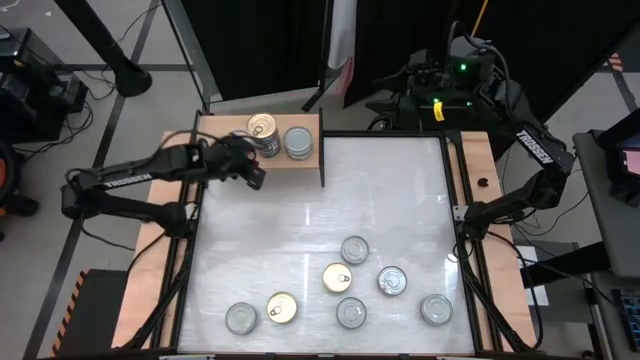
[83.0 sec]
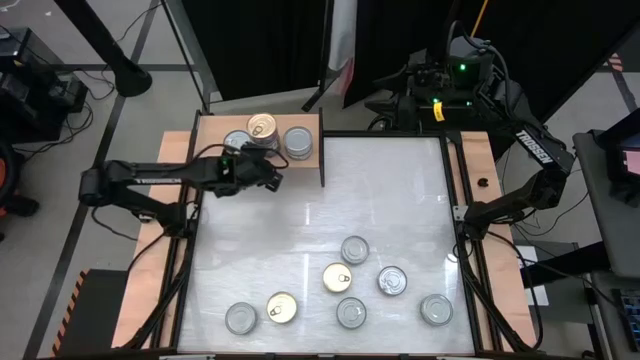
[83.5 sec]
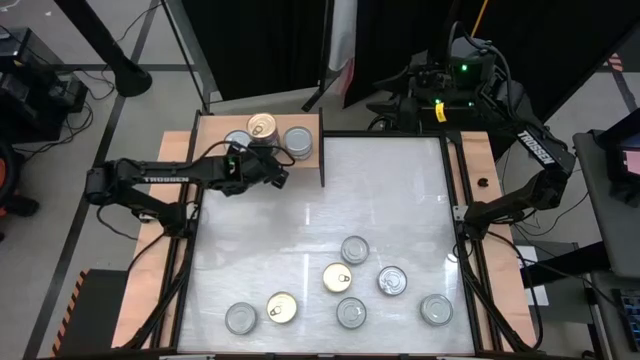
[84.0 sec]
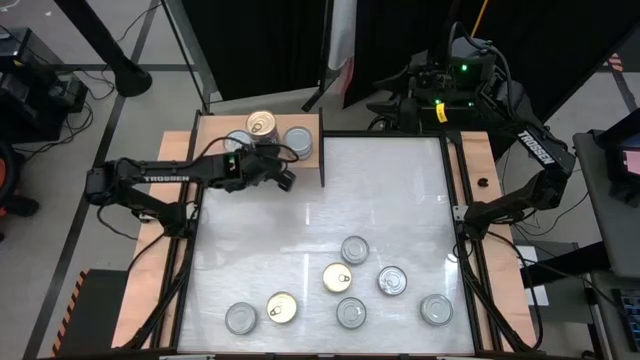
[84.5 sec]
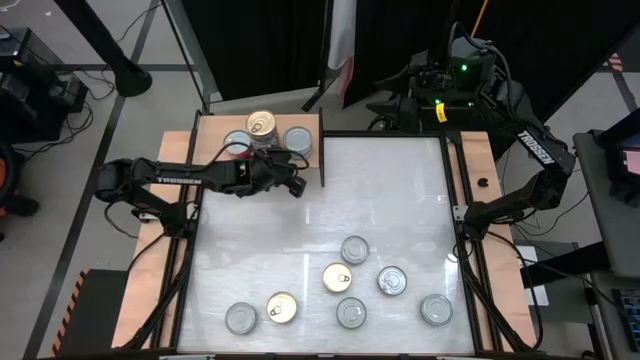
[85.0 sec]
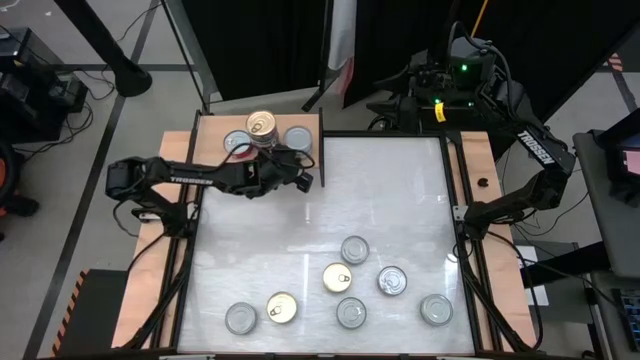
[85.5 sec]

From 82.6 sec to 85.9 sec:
Task: Stack canned seafood by type on shelf
Adjust the stacked tuna cans on the shelf

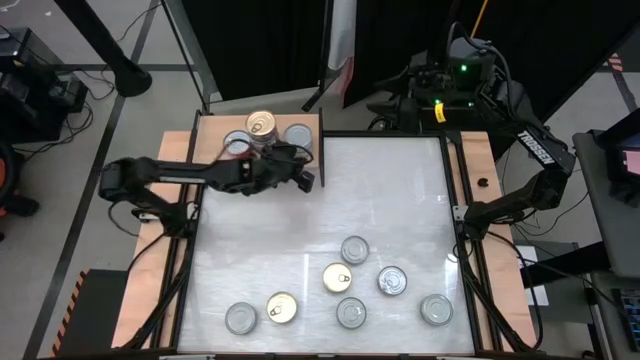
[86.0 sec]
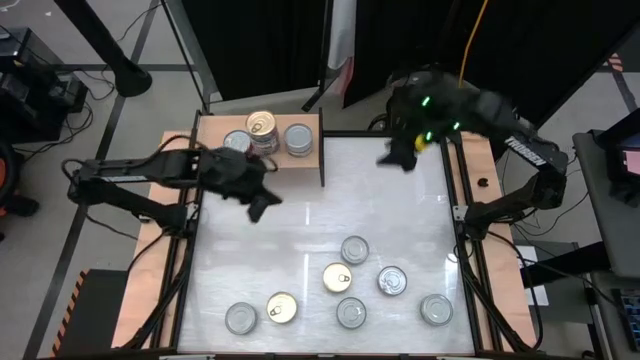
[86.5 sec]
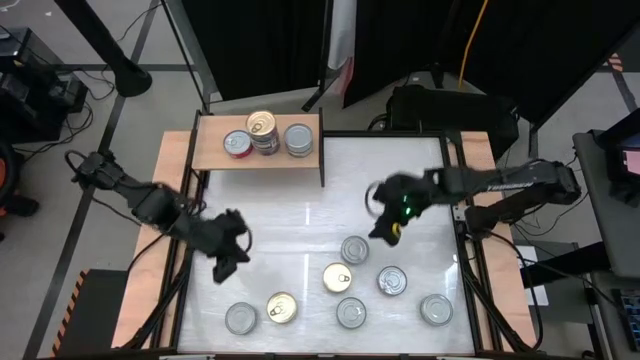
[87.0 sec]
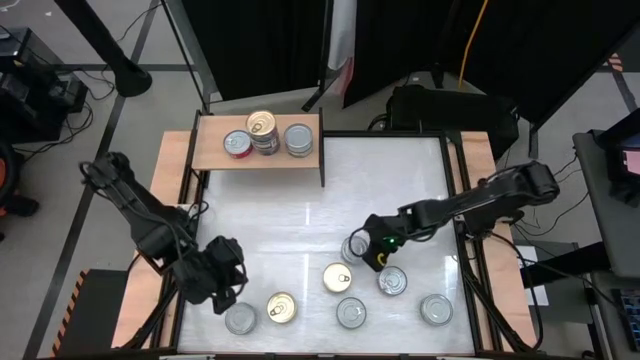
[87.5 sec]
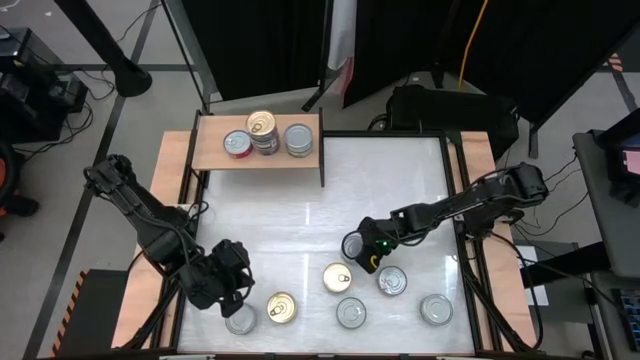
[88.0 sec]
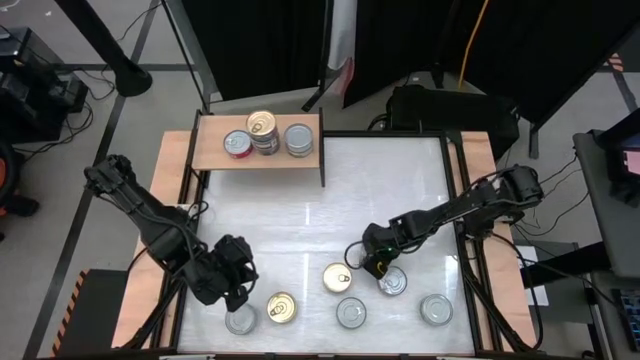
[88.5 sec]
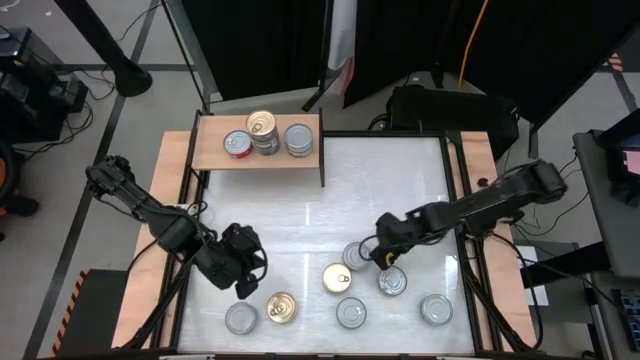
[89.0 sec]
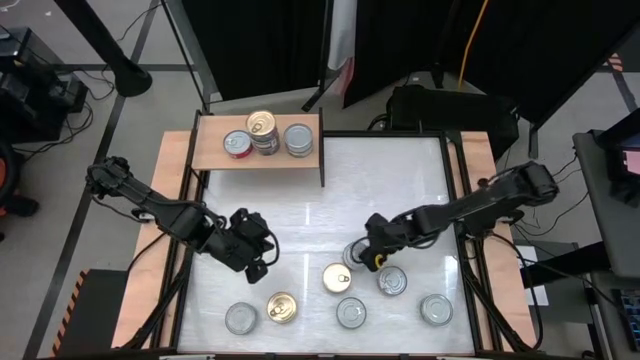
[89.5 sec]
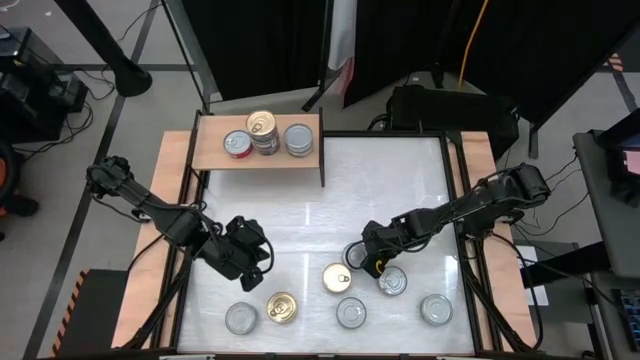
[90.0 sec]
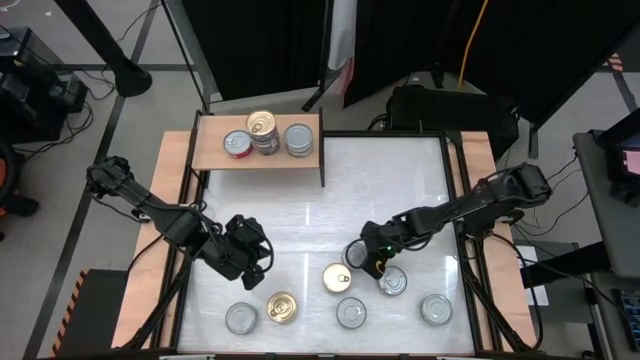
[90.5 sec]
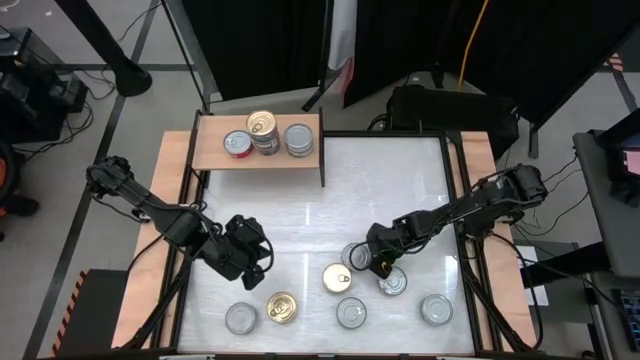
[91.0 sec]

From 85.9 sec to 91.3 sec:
Stack the green white tuna can on top of the green white tuna cans on the shelf

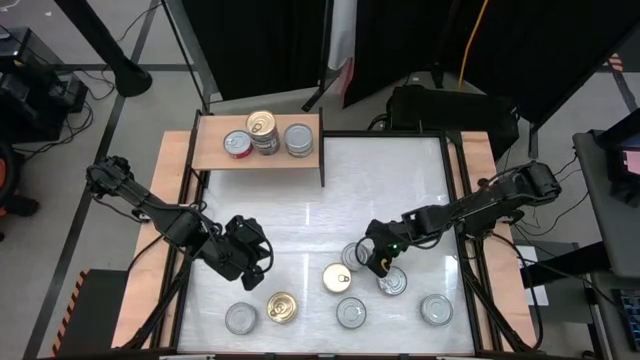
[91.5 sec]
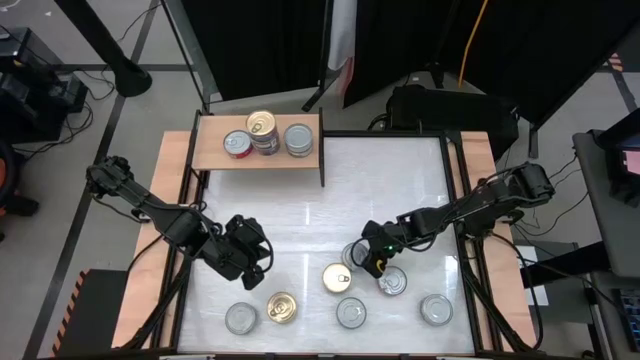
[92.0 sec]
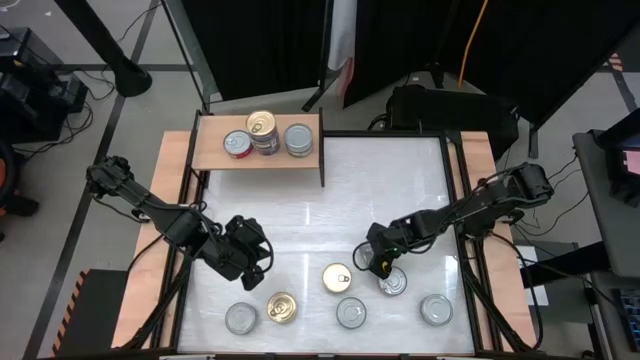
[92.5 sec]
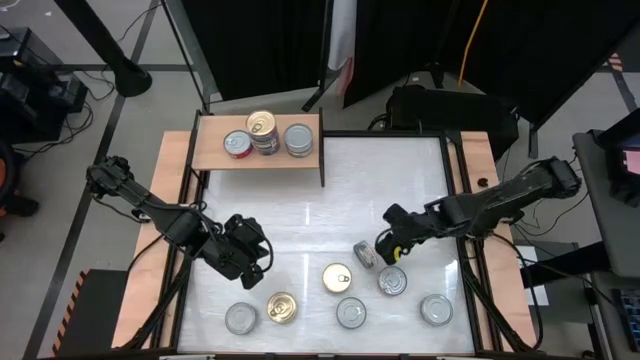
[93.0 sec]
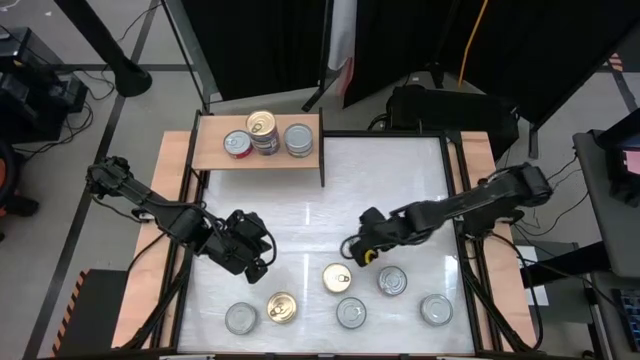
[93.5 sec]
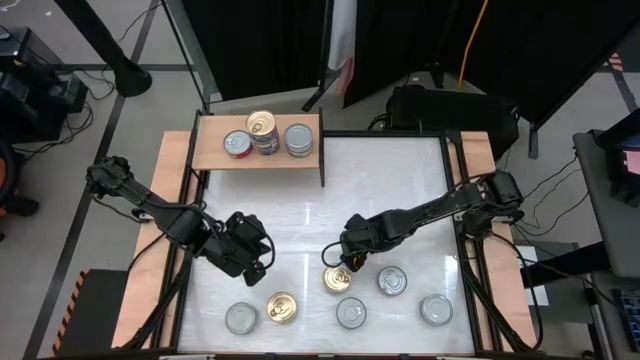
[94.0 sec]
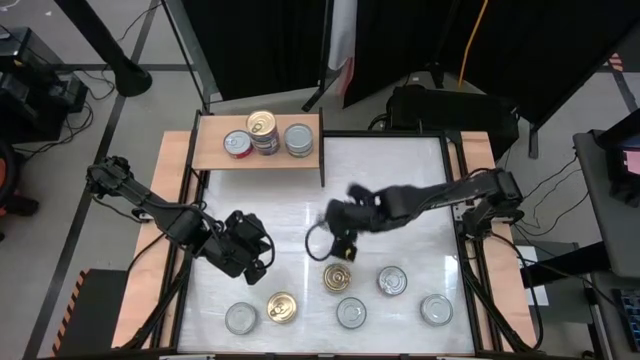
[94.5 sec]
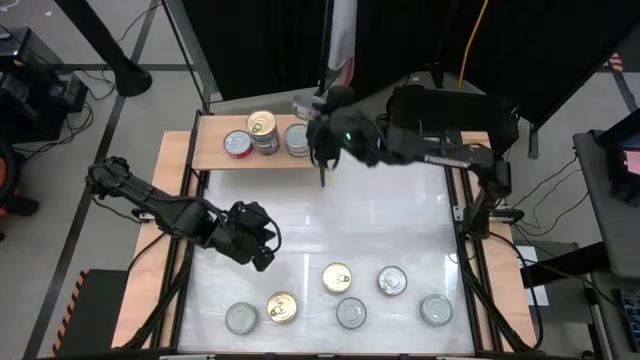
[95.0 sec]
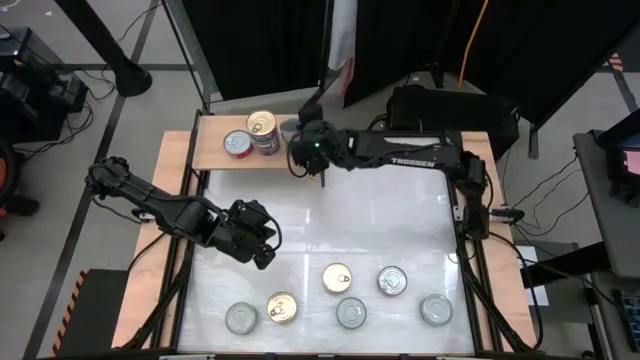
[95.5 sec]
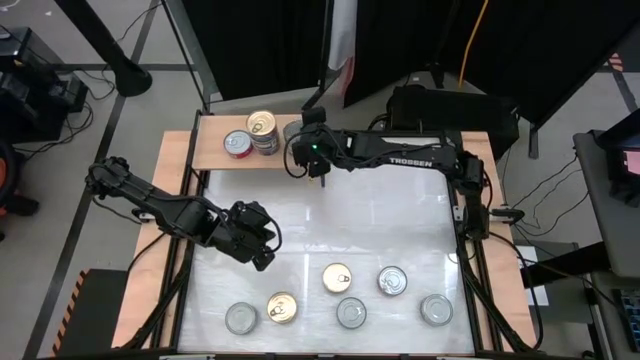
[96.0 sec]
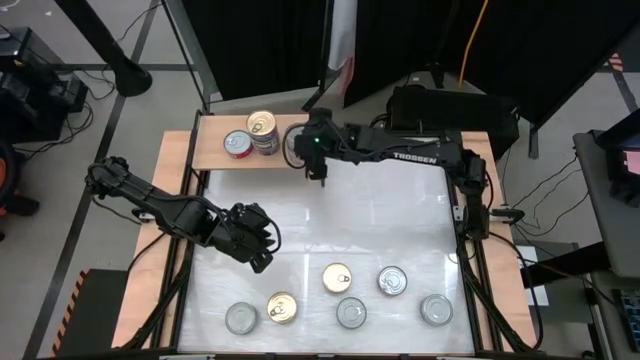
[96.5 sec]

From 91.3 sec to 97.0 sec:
Stack the green white tuna can on top of the green white tuna cans on the shelf

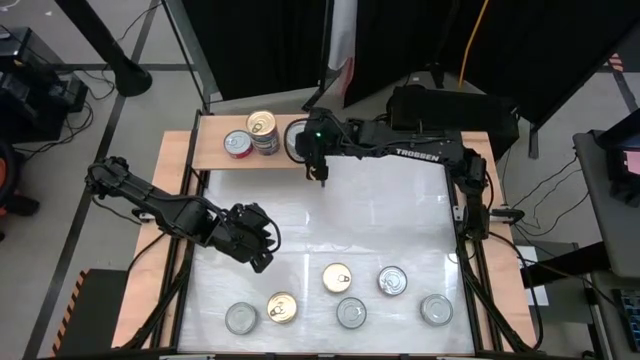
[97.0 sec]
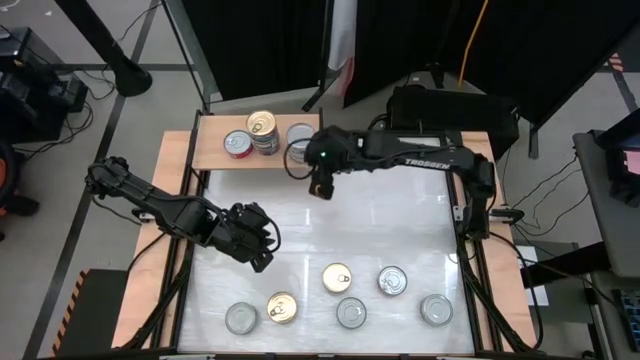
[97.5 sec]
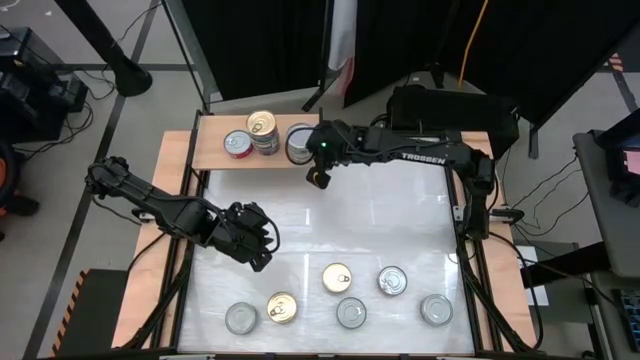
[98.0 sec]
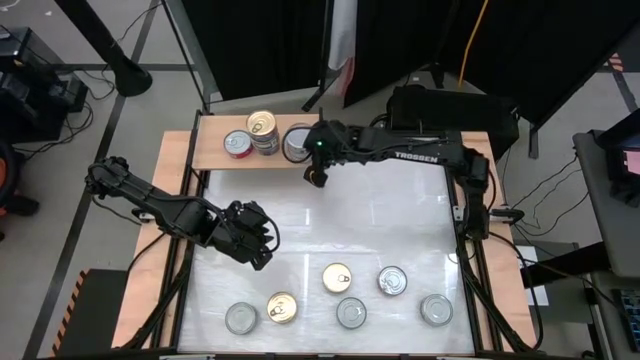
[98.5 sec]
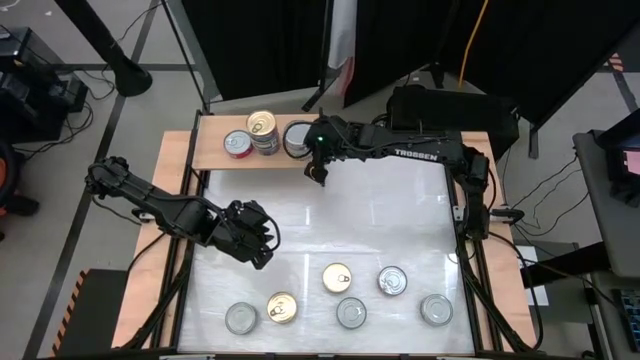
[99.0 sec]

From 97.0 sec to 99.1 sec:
Adjust the stacked green tuna cans on the shelf

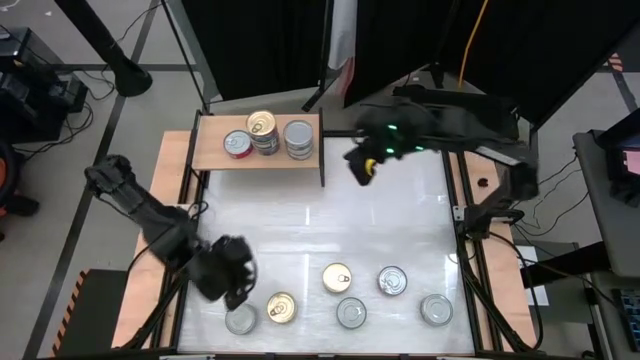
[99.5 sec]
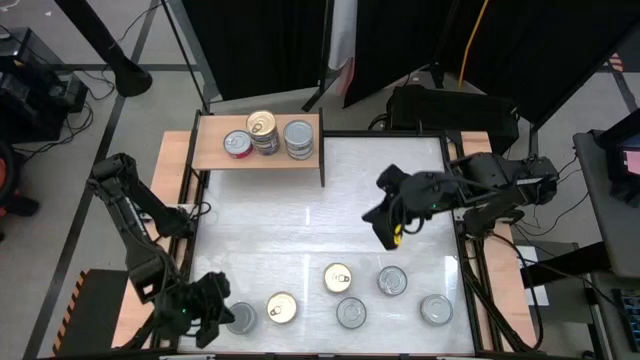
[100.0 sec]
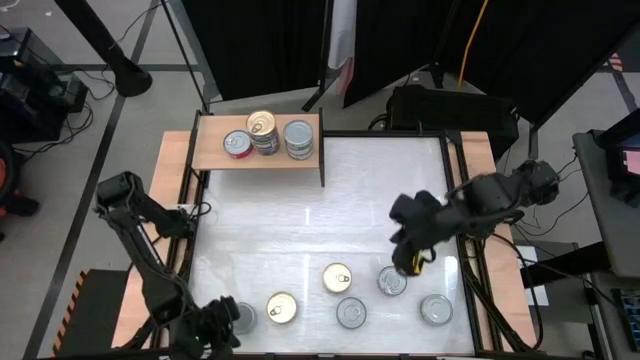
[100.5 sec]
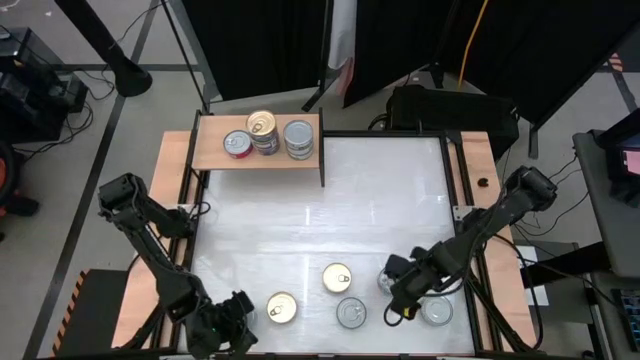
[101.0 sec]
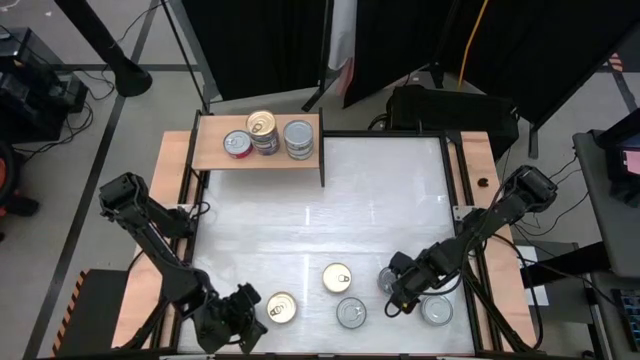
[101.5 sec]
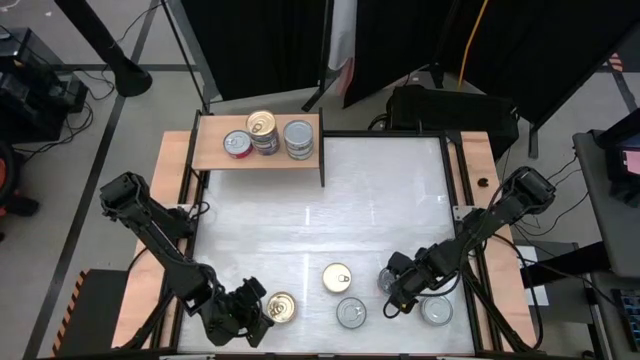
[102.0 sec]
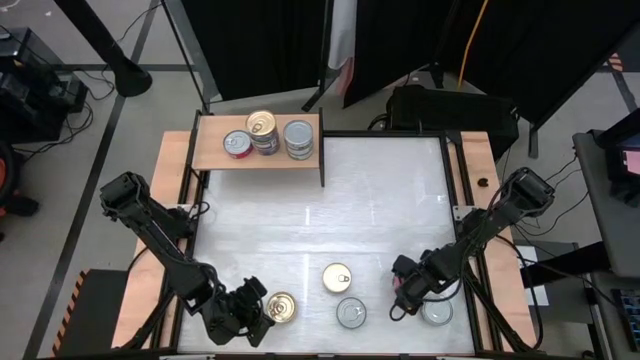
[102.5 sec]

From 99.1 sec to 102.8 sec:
Stack the red tuna can on top of the red tuna can on the shelf

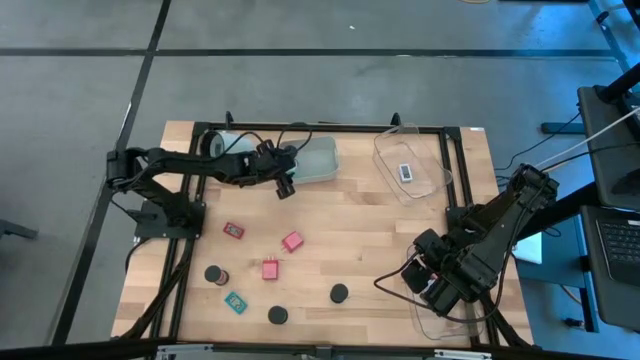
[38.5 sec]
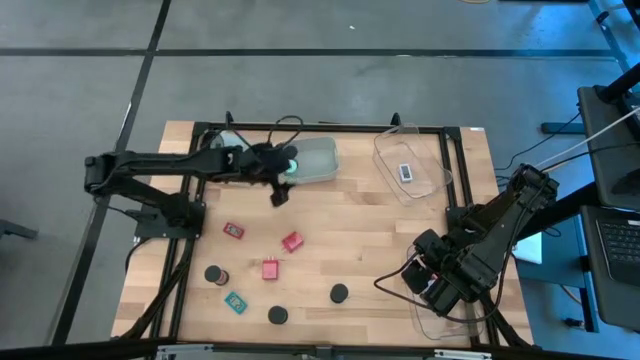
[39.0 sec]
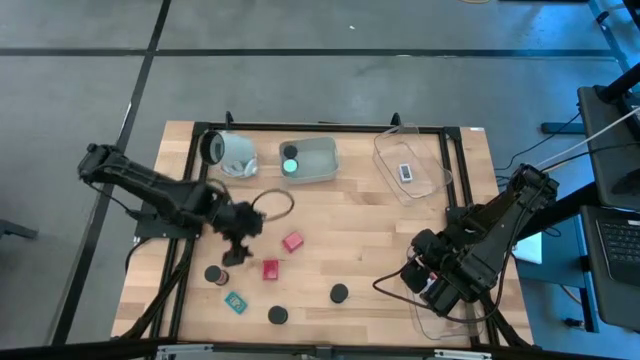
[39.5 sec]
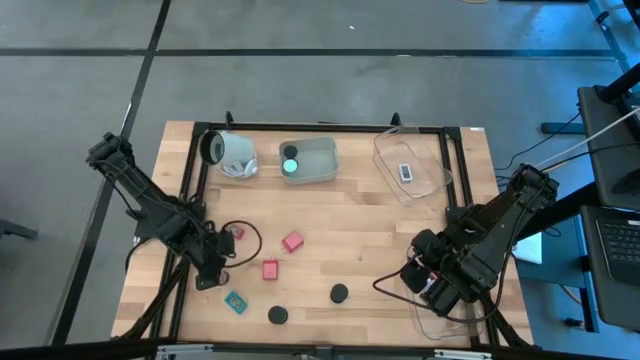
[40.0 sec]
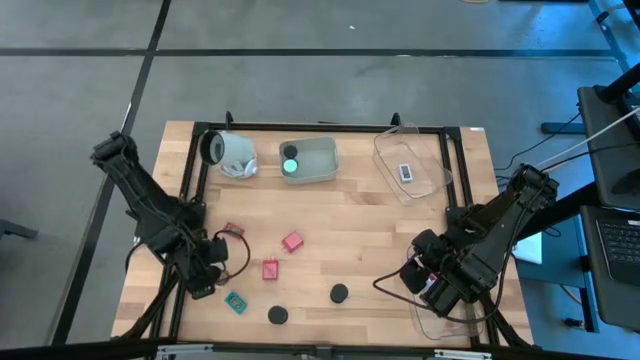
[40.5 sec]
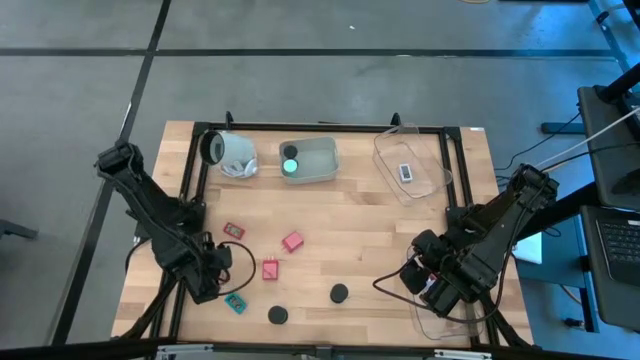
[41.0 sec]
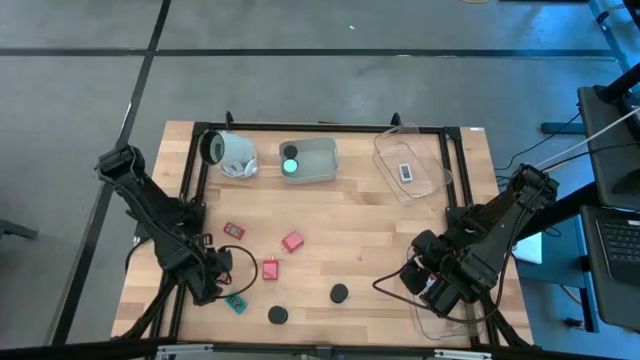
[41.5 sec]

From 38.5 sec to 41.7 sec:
Task: Pick & Place Office items
Put the red hourglass into the gray bin
